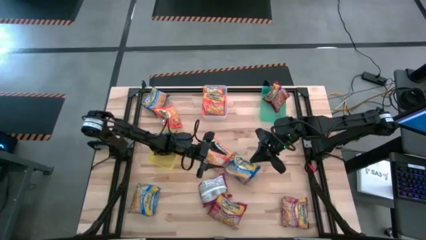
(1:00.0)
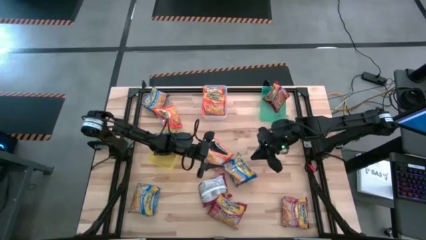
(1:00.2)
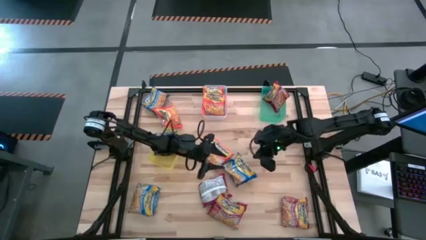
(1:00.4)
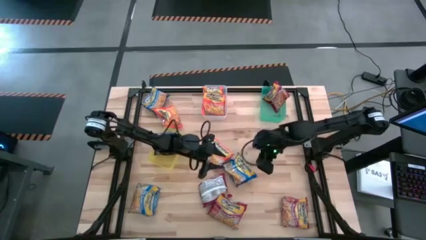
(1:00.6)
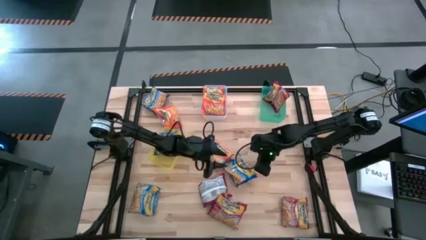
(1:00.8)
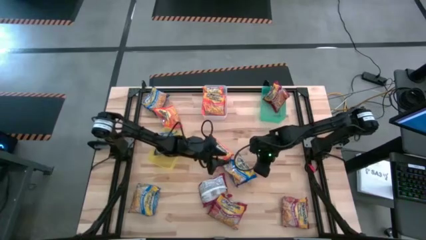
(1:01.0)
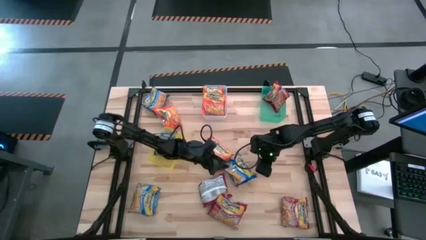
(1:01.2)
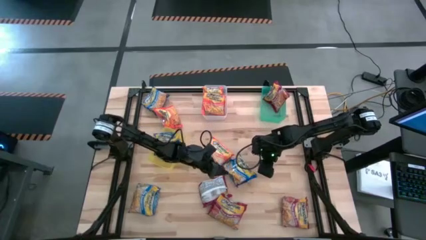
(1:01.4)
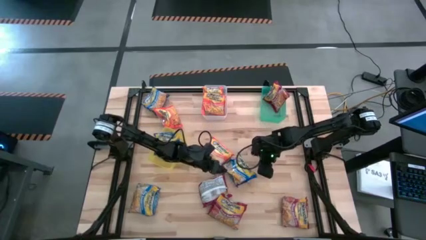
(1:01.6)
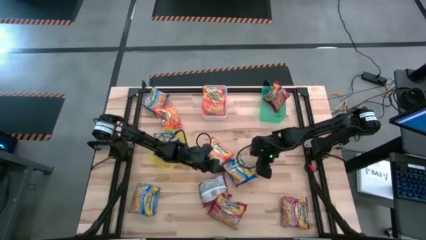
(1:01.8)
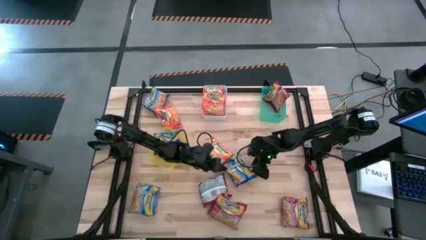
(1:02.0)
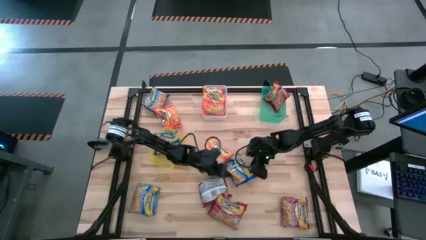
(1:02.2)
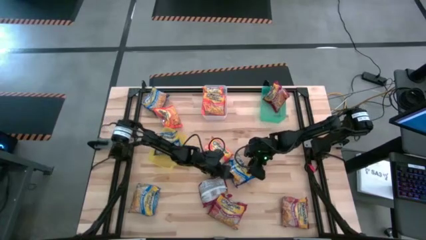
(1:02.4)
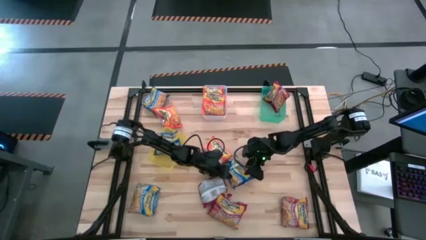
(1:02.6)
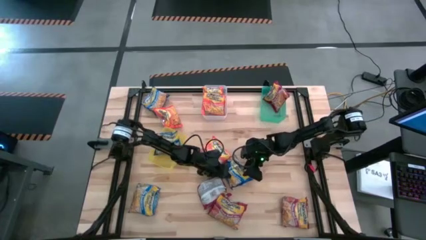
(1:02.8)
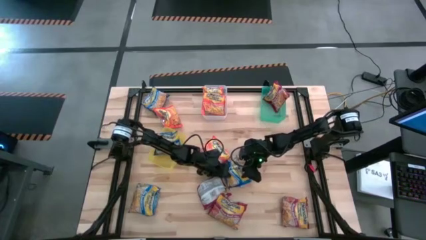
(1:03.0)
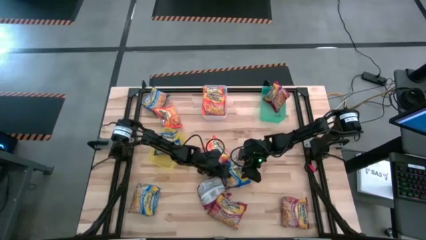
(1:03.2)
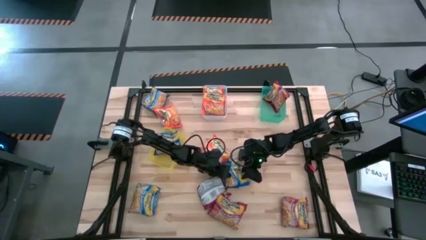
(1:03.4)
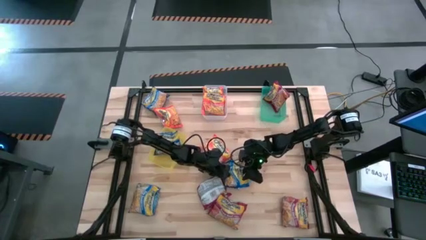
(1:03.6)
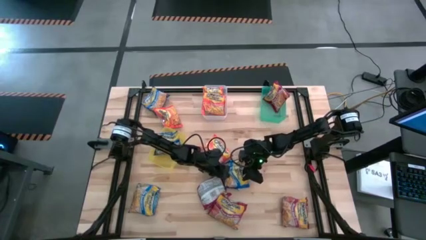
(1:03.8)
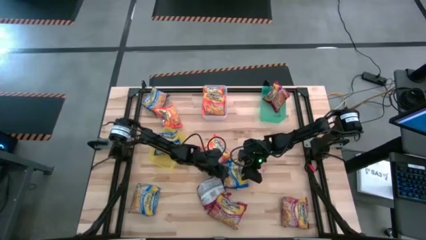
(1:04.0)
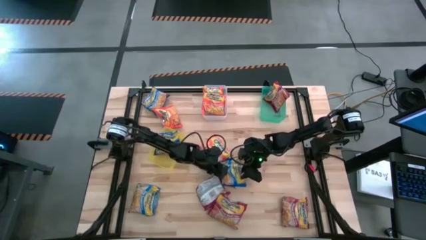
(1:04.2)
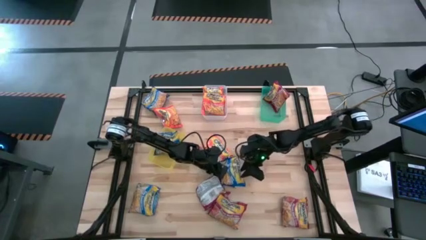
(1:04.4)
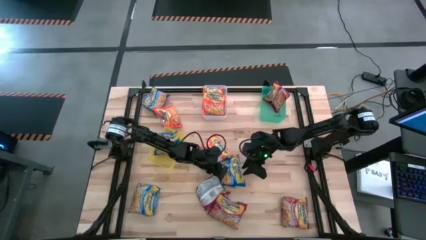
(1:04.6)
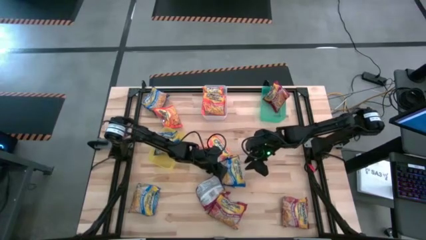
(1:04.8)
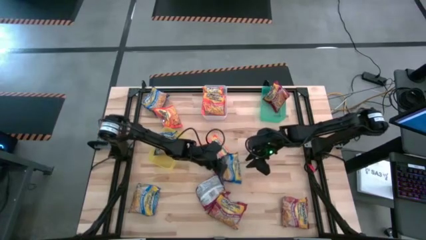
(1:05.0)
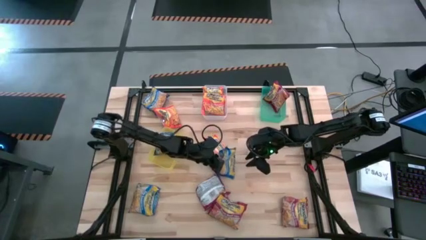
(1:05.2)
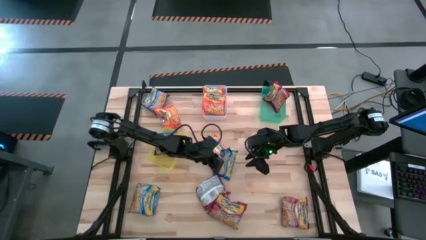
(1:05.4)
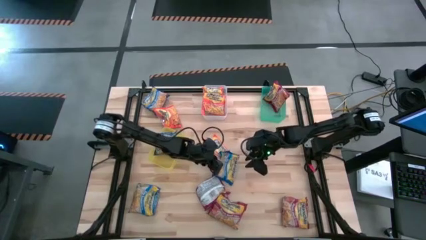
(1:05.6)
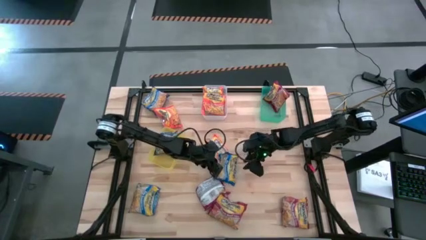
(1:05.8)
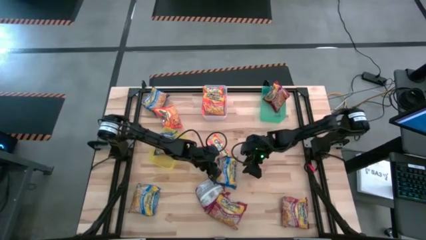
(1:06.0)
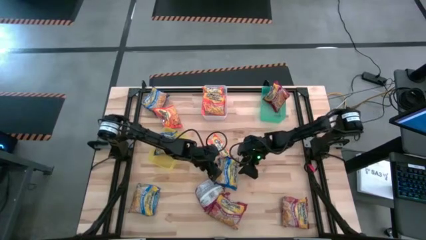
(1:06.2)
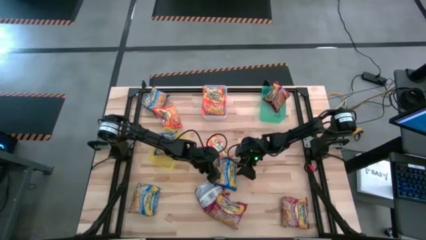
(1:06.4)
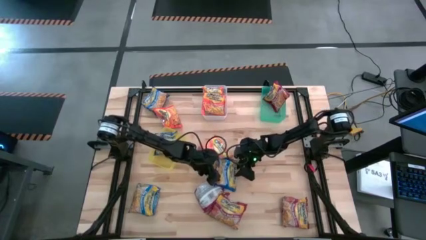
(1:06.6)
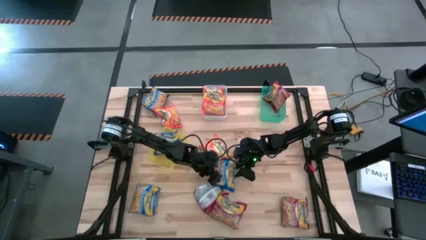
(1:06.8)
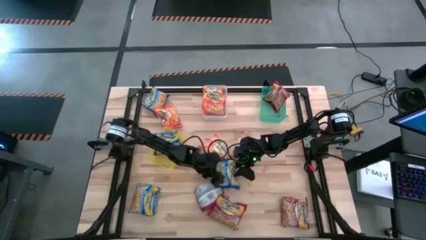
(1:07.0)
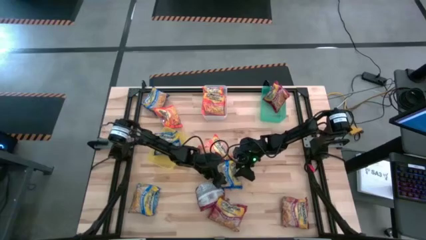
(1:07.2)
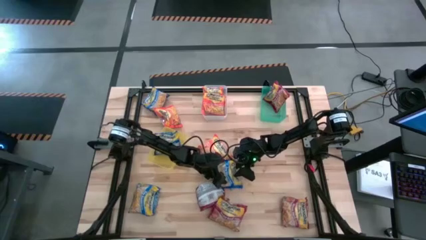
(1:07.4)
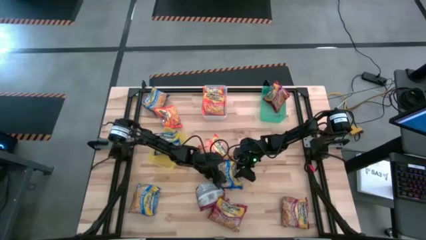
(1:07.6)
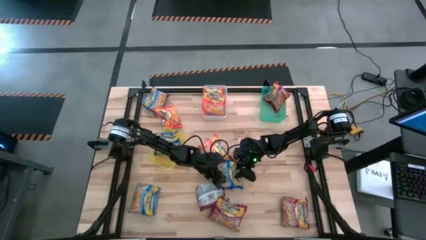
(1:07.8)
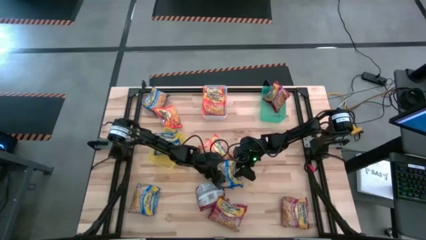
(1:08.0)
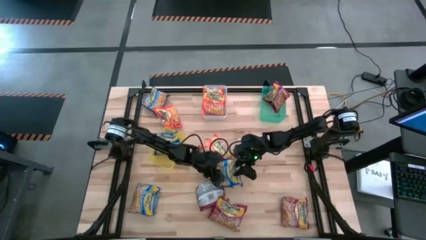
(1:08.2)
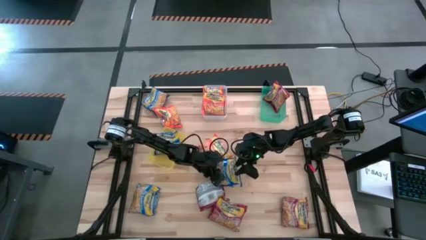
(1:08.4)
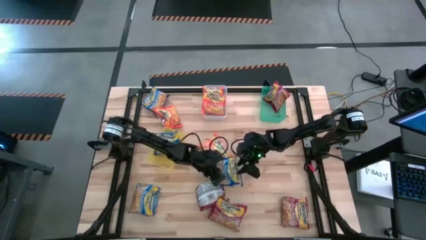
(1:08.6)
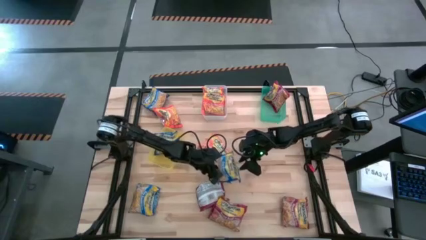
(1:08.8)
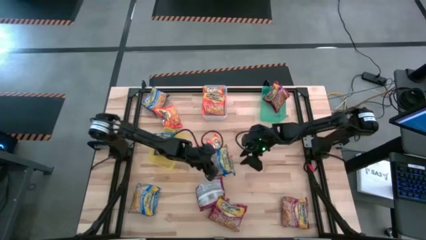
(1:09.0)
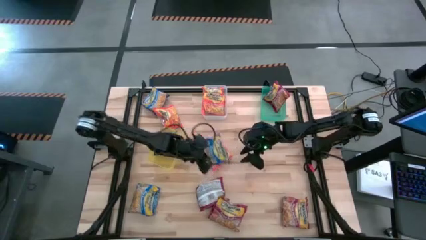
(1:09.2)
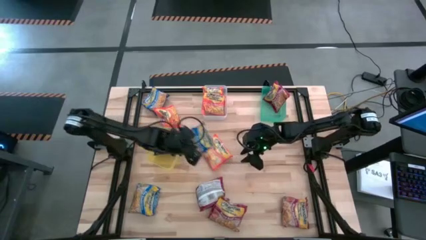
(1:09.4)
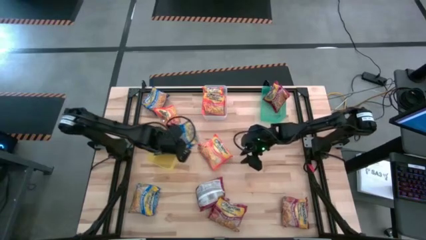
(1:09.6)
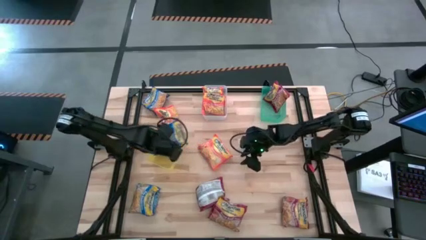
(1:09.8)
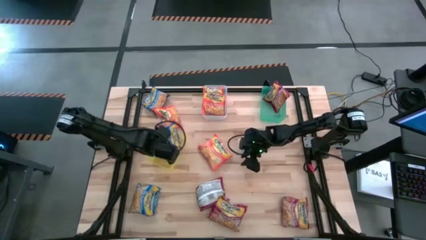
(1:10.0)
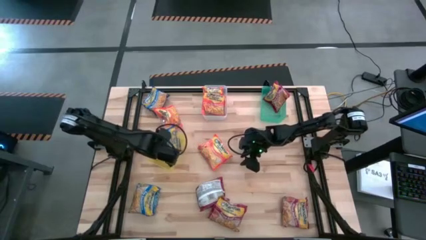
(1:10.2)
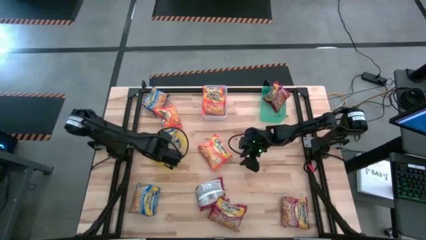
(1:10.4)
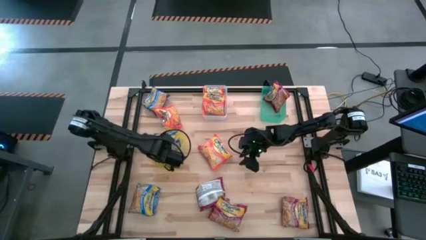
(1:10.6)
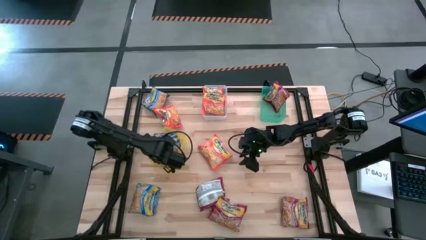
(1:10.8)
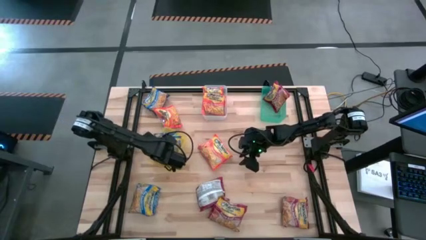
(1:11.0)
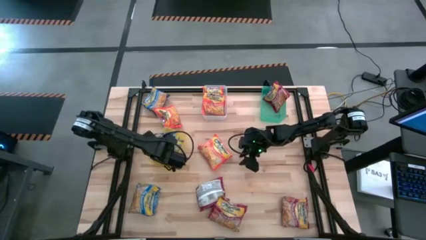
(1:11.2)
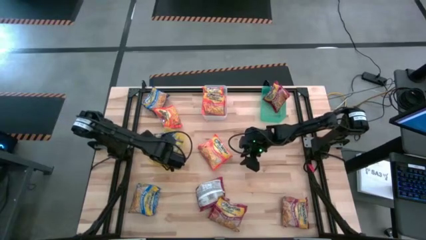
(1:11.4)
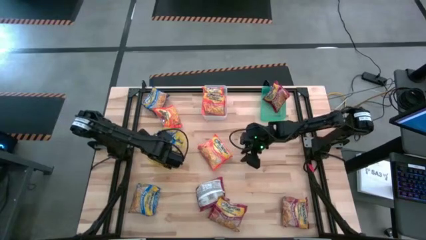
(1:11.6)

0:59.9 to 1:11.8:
Task: Sort Maruchan noodles
Put the blue noodle pack into the yellow bin

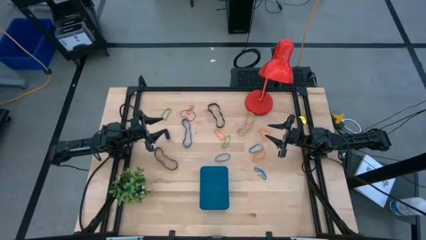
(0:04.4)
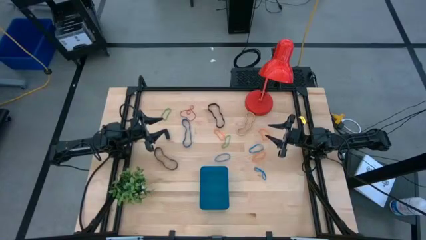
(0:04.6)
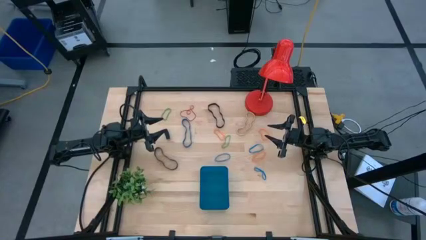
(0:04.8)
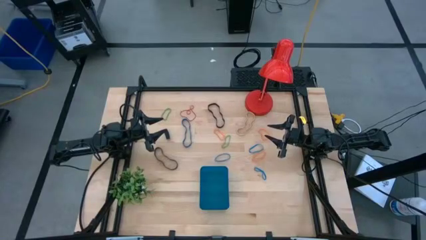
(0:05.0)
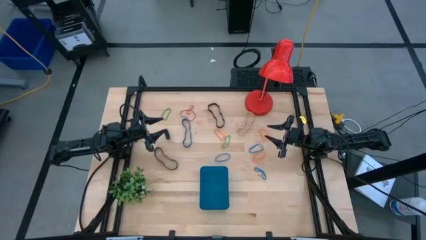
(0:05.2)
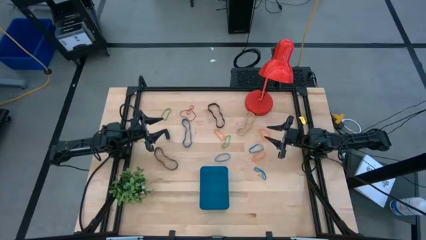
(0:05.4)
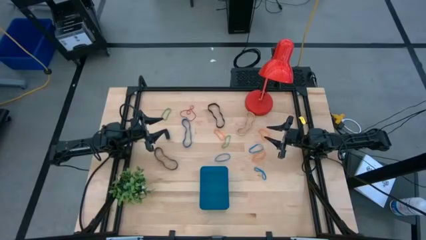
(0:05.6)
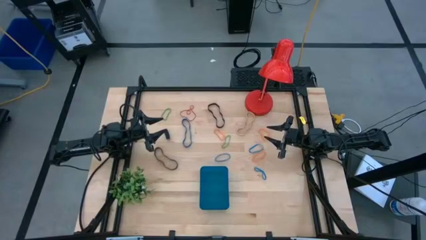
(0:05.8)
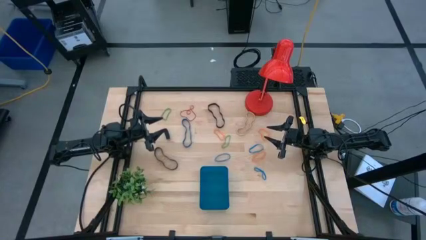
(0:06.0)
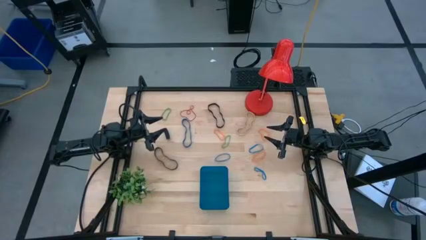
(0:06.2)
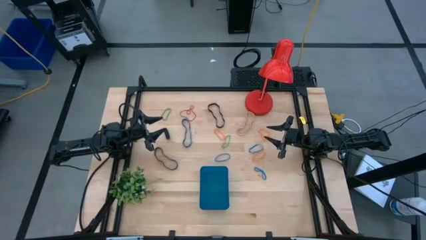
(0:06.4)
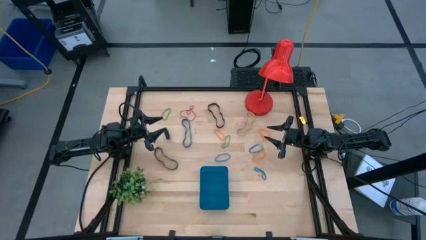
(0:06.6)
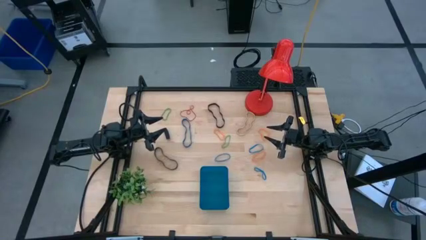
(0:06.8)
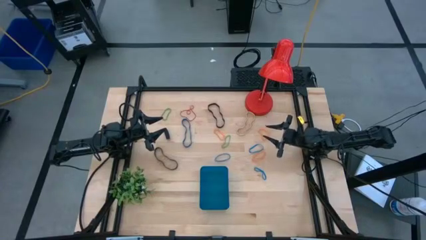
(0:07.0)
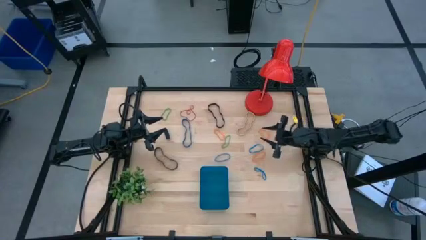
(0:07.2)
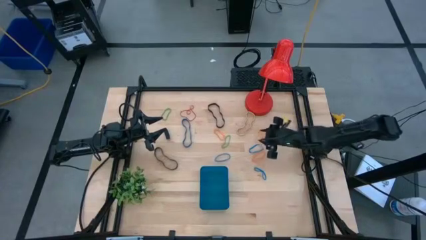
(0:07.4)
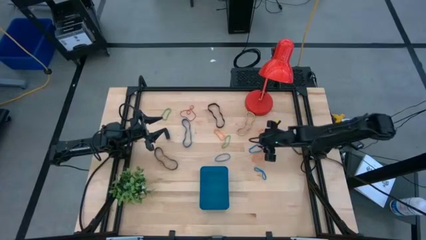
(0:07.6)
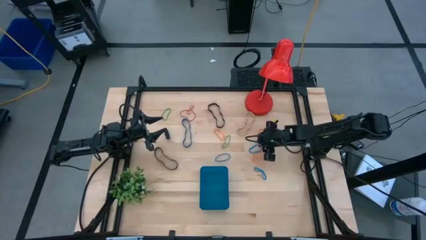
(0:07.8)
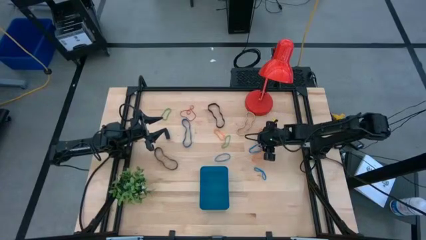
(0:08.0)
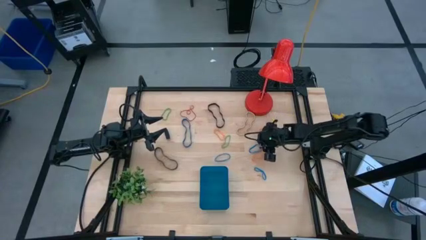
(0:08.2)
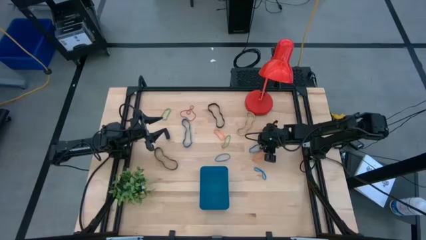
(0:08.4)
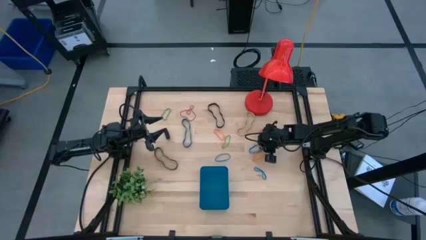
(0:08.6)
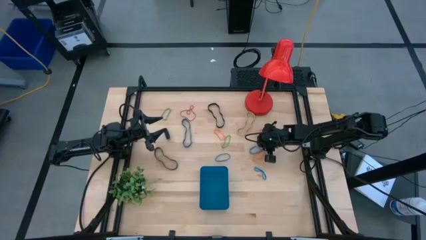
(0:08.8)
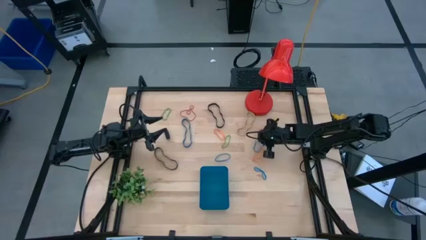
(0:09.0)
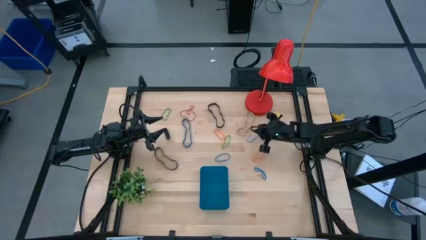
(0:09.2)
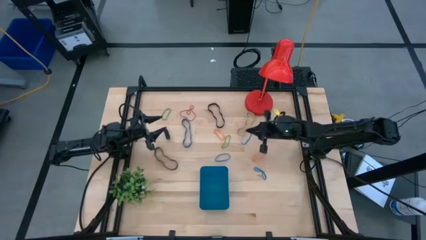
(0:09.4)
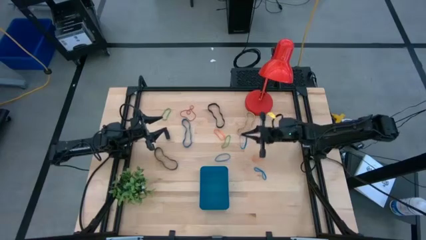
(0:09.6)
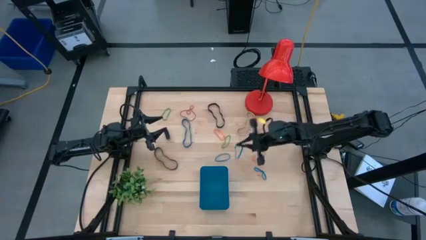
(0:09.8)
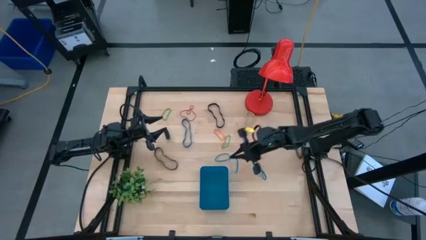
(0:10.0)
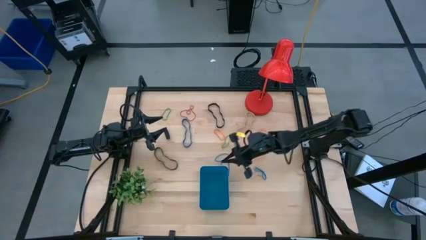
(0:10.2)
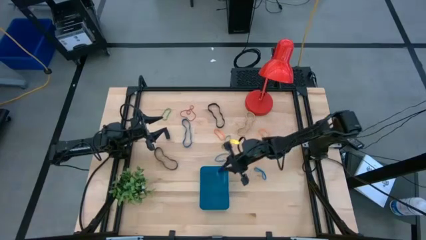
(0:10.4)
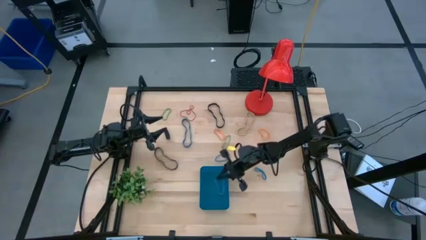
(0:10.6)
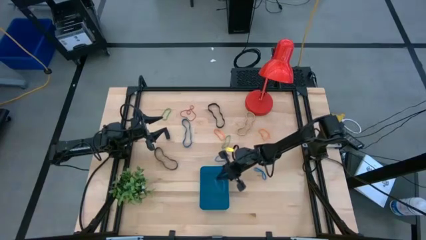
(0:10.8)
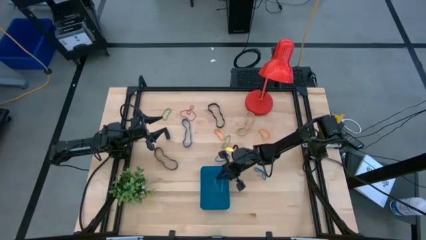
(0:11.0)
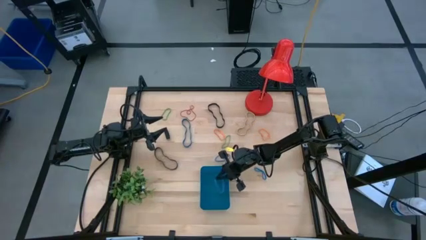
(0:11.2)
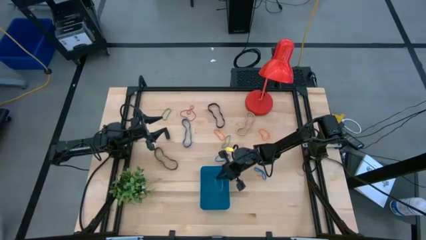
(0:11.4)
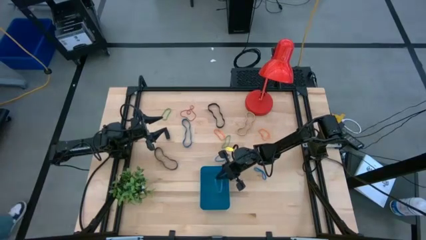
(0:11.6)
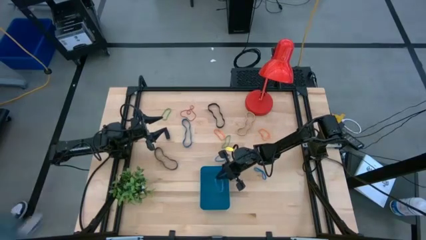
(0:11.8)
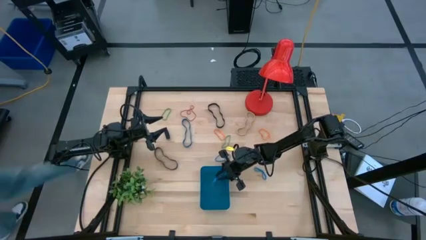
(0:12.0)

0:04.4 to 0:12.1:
Task: Pick and place rubber bands into bin
Put the top right light blue rubber band into the blue bin
